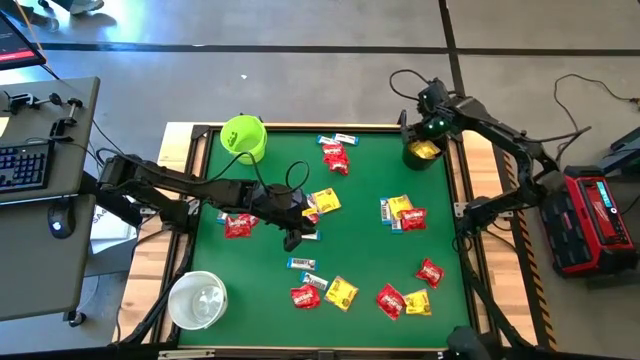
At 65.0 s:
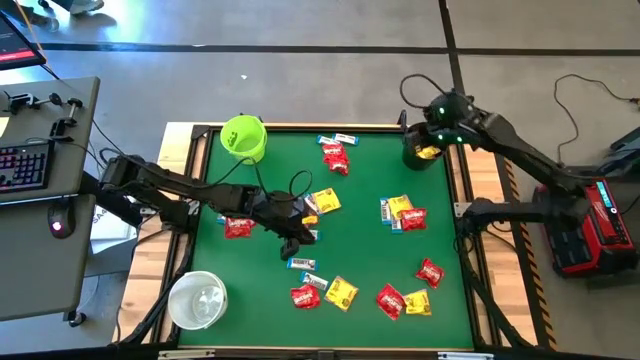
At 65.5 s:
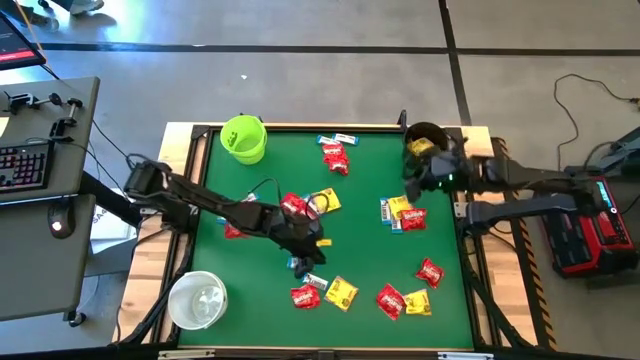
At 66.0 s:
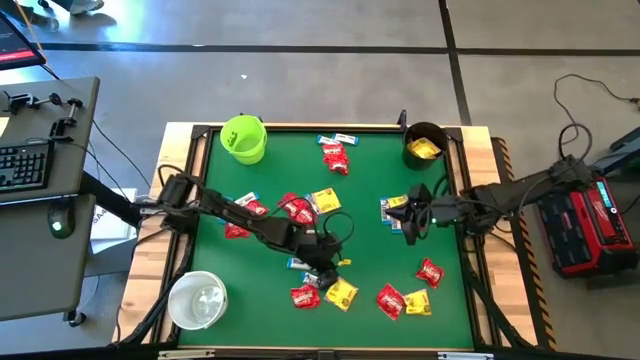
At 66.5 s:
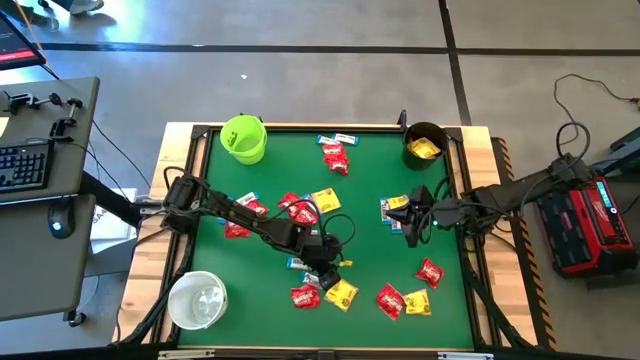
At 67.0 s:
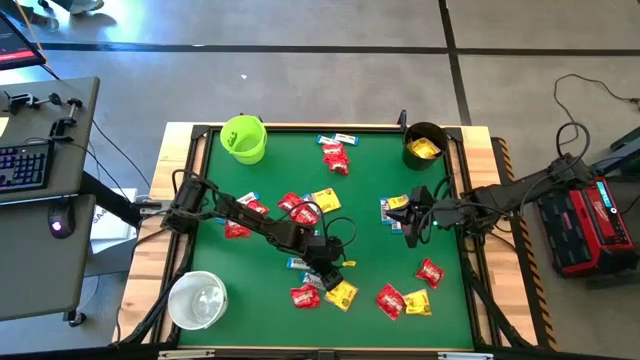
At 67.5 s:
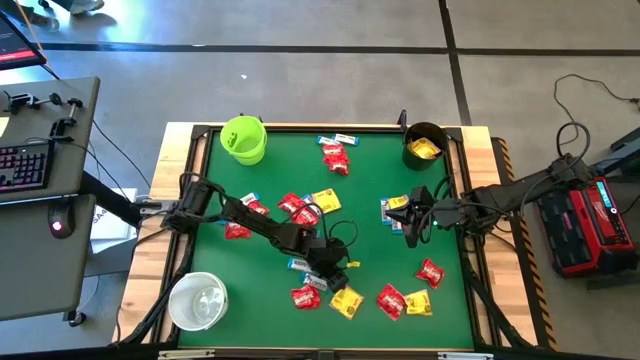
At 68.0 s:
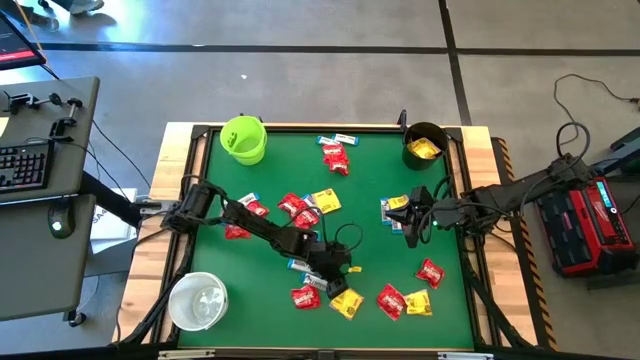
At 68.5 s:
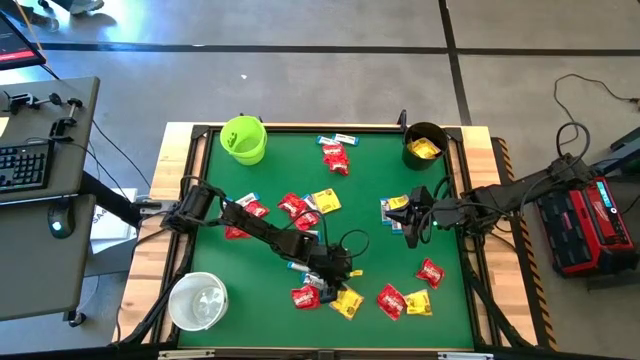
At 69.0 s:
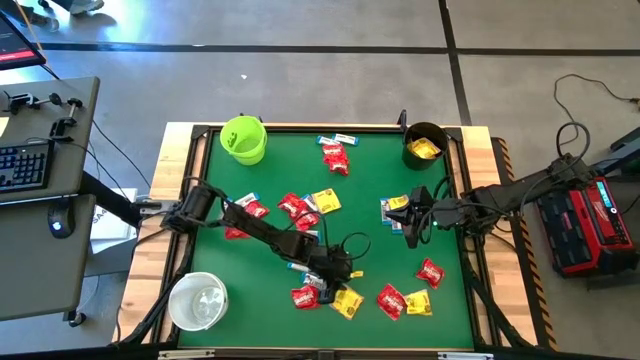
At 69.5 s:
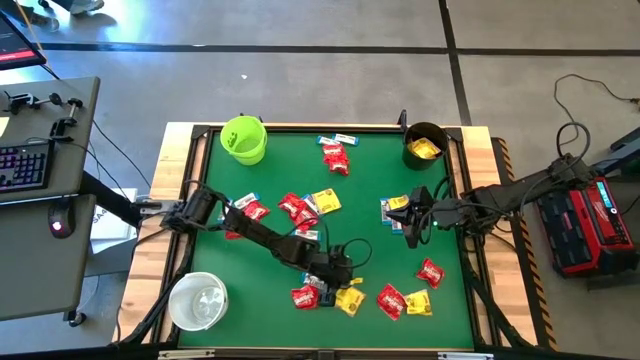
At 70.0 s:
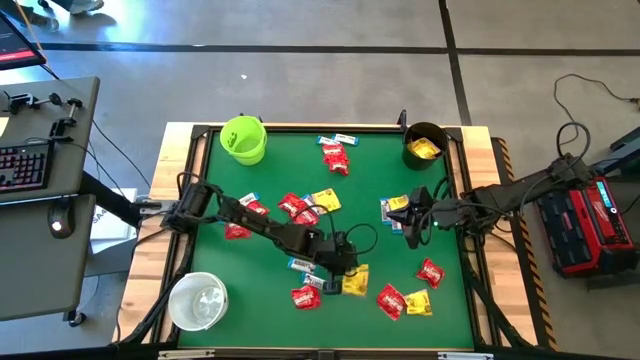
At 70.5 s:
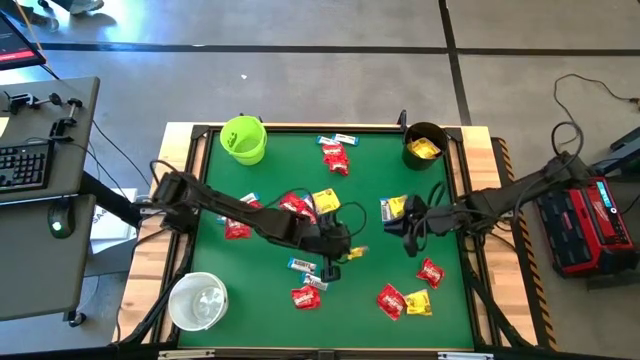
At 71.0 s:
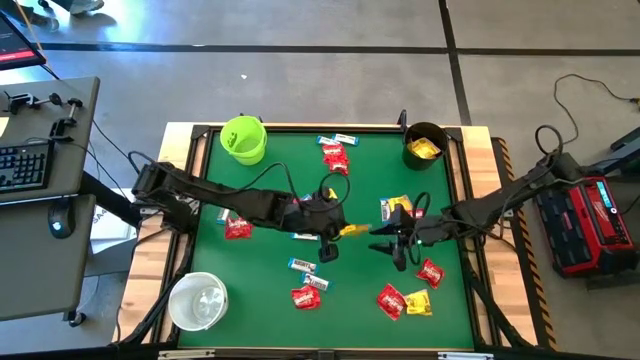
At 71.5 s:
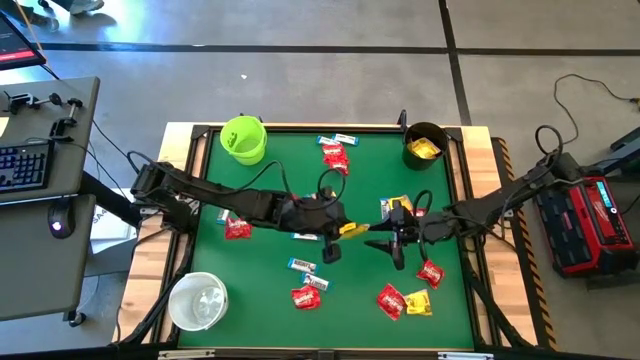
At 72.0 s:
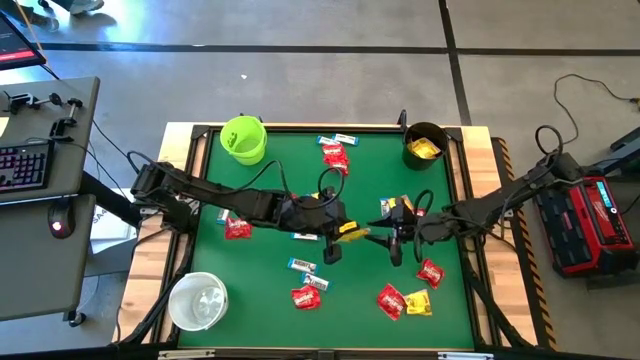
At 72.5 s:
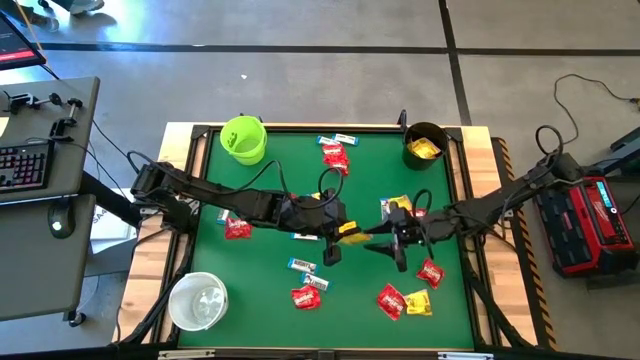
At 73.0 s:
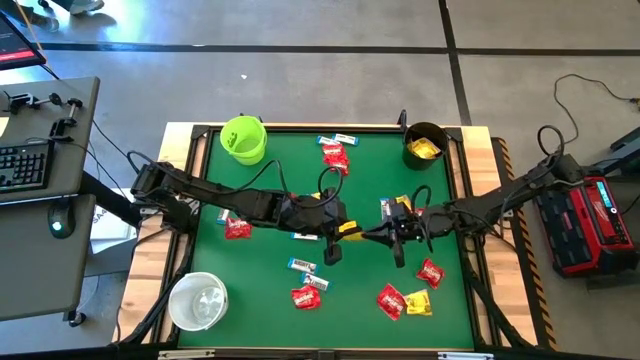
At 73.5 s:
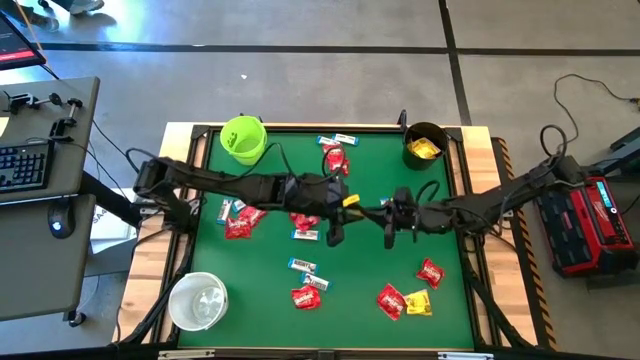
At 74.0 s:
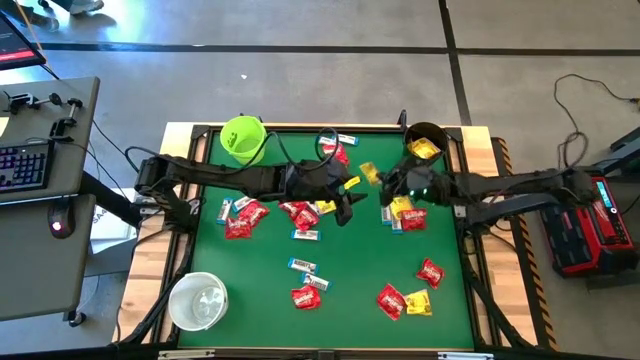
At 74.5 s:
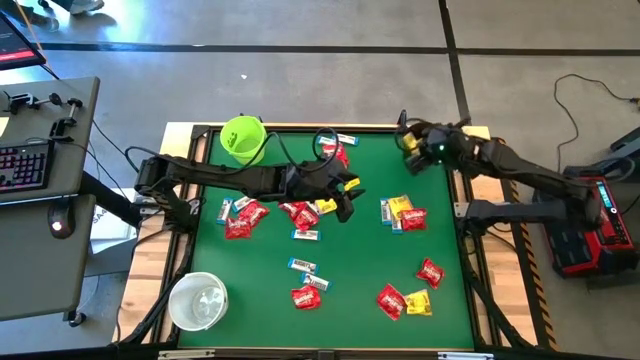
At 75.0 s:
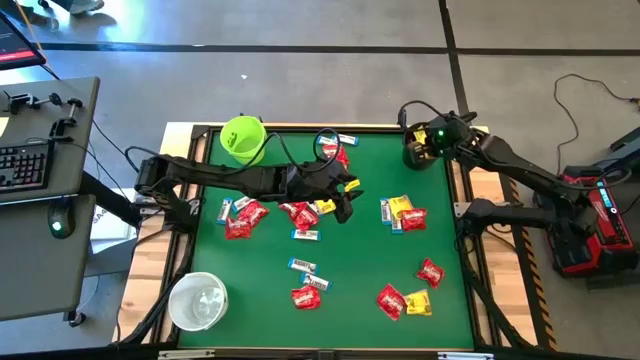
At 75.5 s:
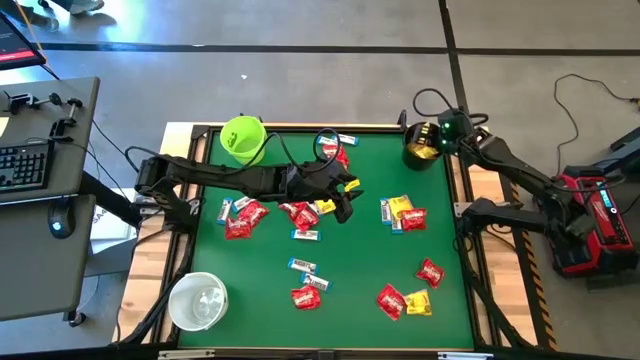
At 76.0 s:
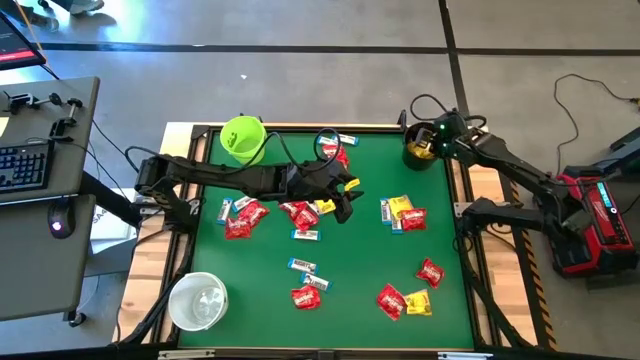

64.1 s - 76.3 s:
Task: Sort candy by brand, put in halloween buckets
Put the yellow candy into the black bucket

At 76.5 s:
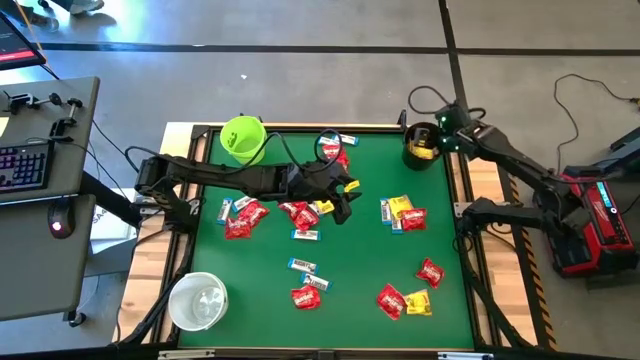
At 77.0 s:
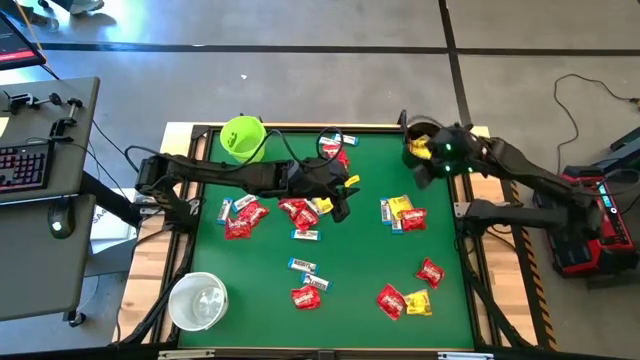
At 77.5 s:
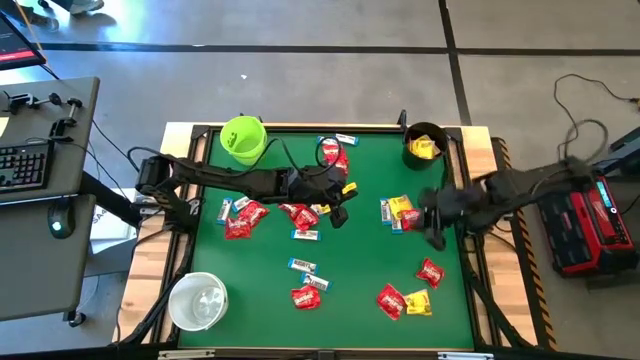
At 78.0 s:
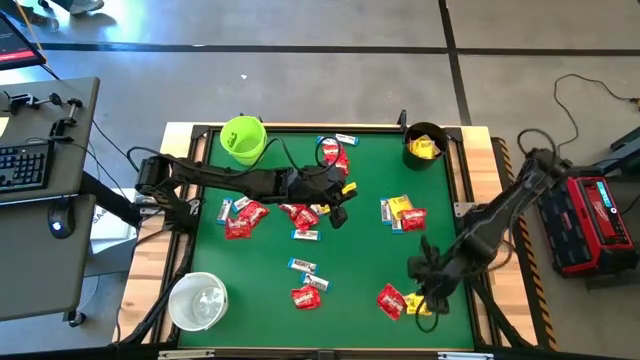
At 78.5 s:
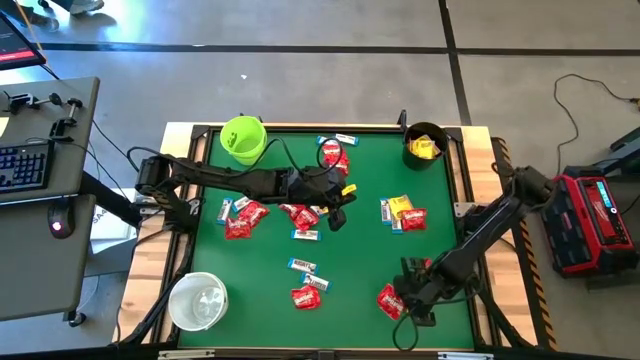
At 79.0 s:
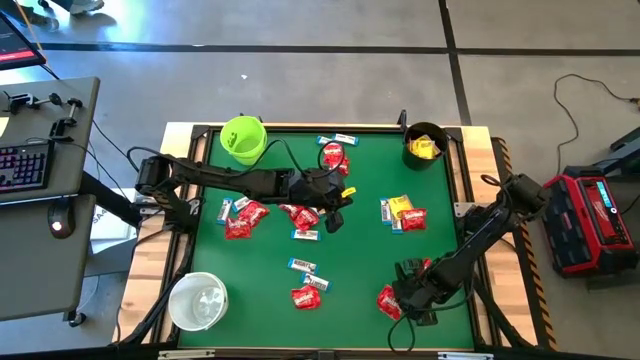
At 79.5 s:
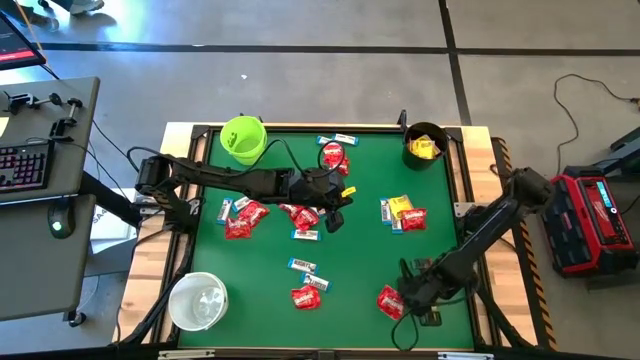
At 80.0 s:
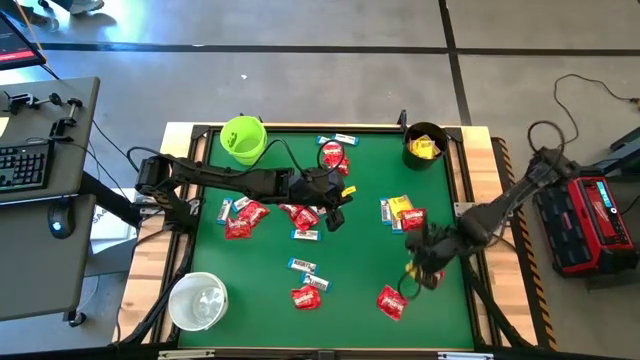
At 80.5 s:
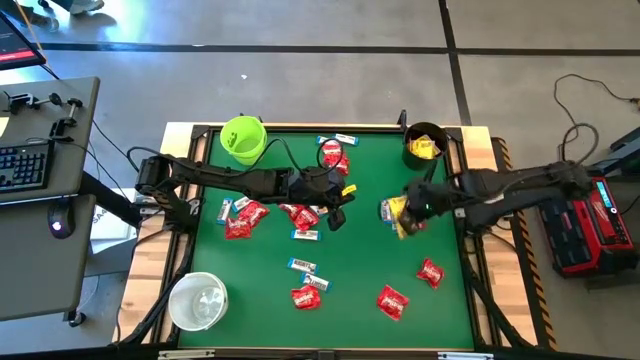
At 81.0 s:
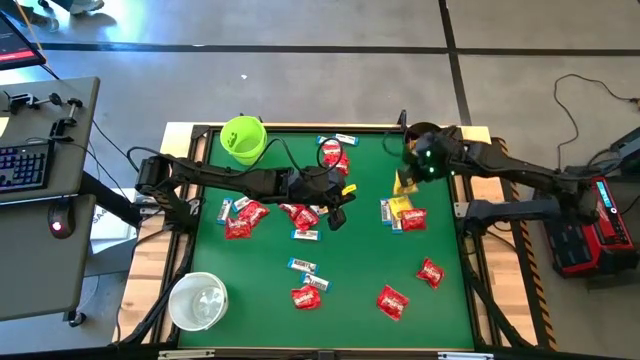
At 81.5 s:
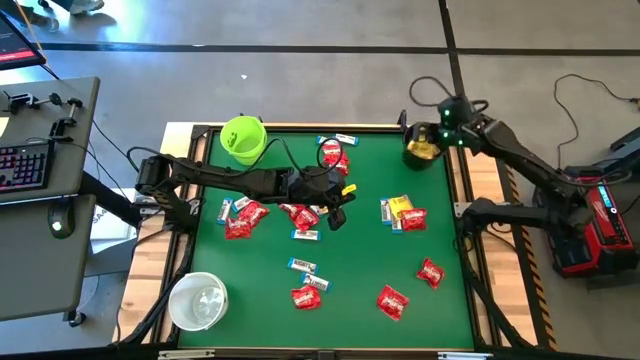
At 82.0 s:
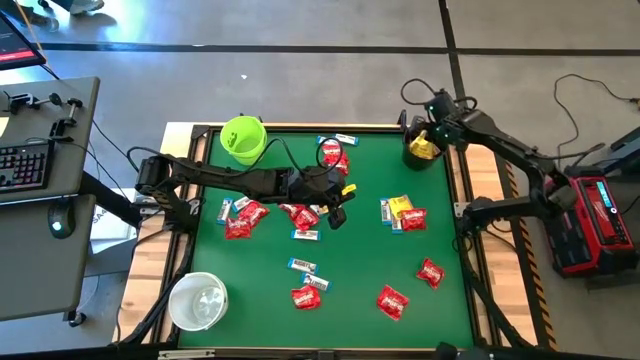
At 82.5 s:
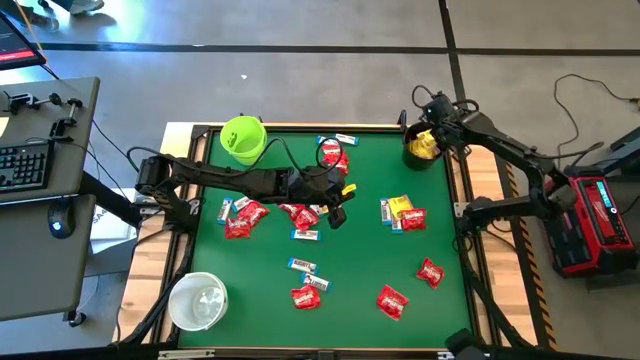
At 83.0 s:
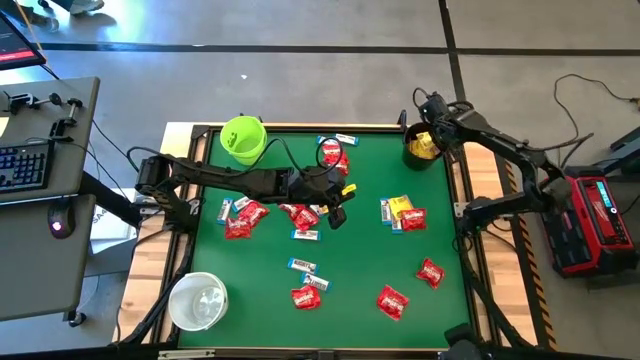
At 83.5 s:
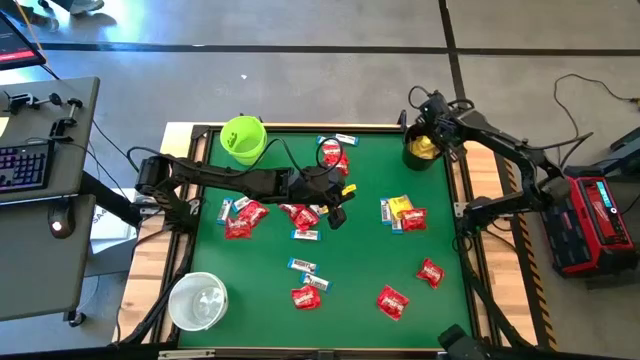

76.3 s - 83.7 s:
Put the yellow candy into the black bucket

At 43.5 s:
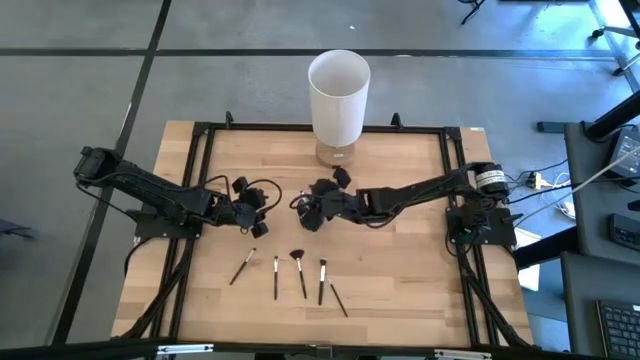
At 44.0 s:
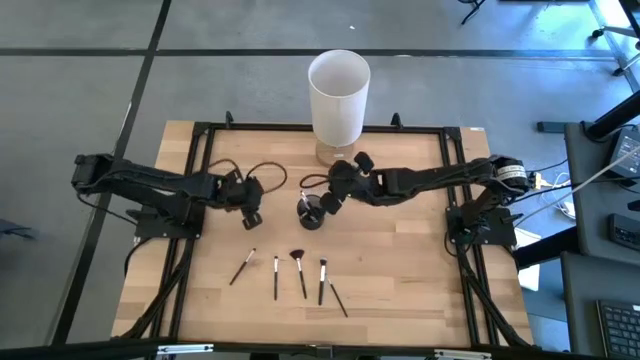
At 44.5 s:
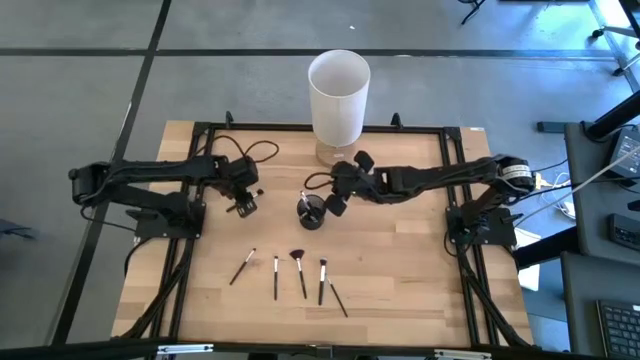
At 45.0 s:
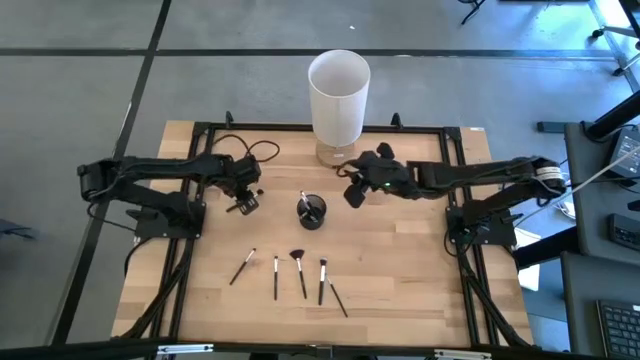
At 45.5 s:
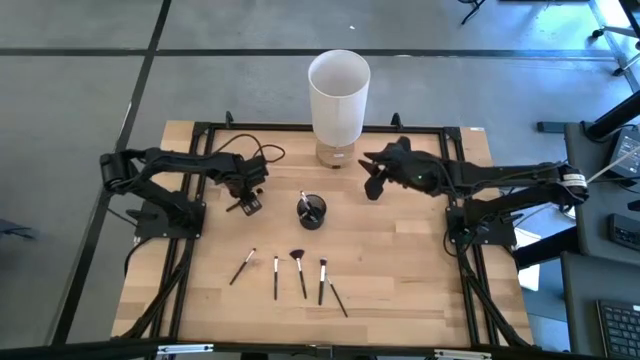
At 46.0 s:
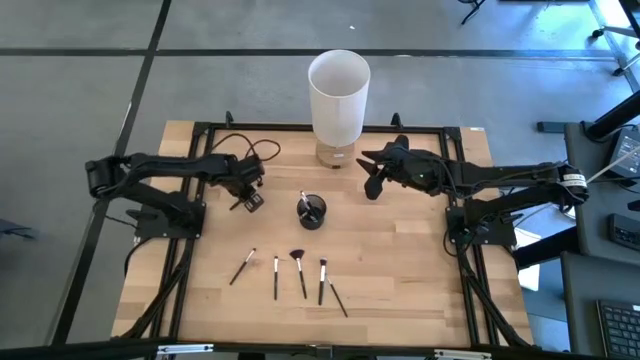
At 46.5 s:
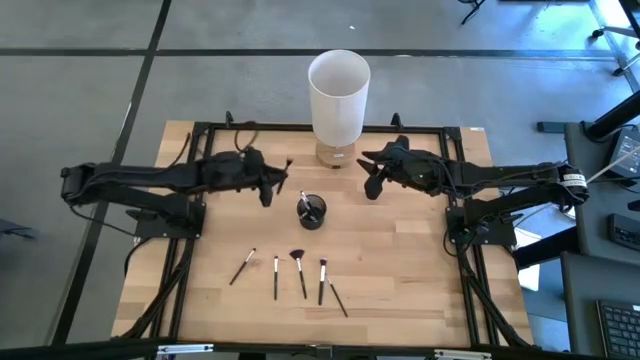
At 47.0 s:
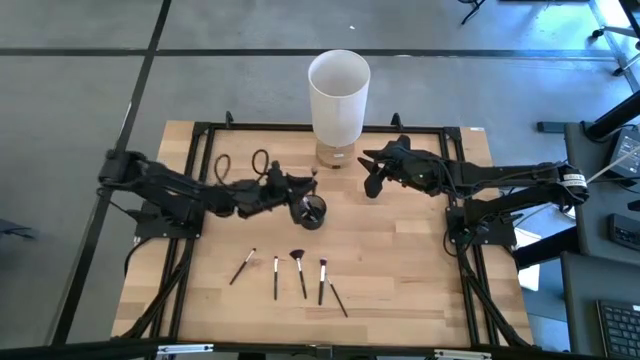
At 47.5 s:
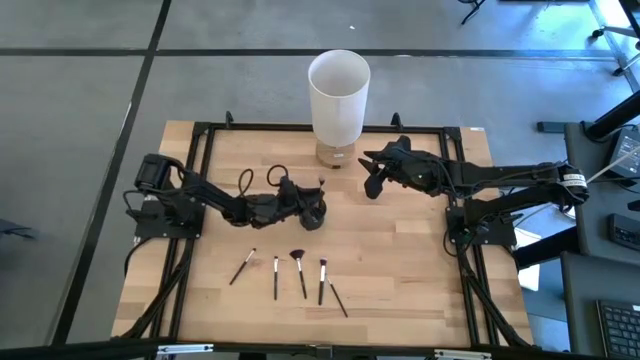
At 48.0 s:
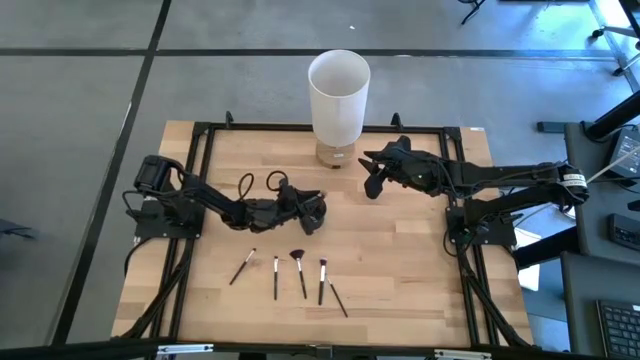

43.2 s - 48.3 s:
Task: Put items in baskets/containers
Put the black foundation brush into the black pen holder
